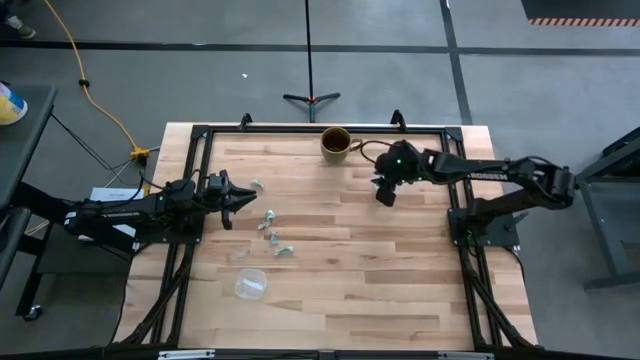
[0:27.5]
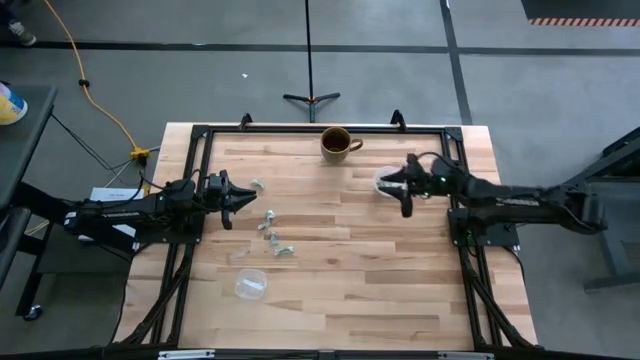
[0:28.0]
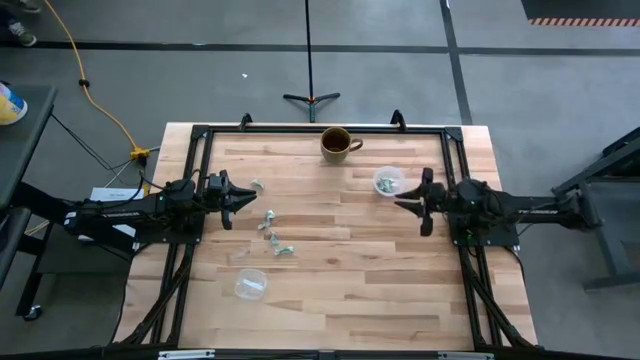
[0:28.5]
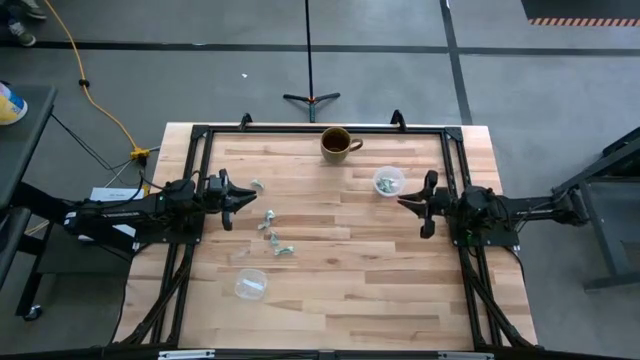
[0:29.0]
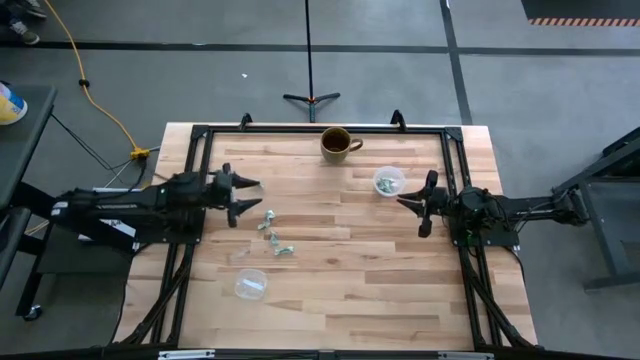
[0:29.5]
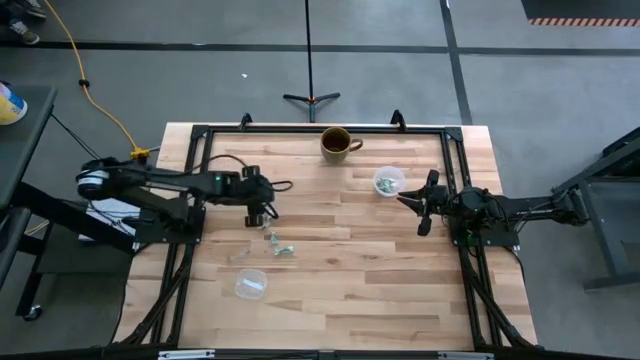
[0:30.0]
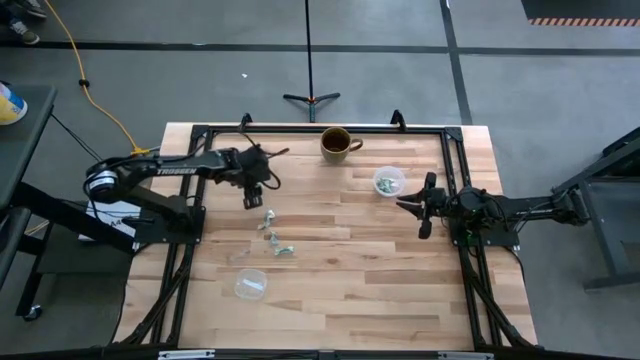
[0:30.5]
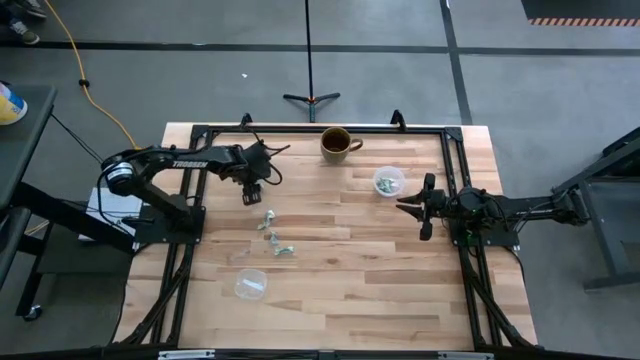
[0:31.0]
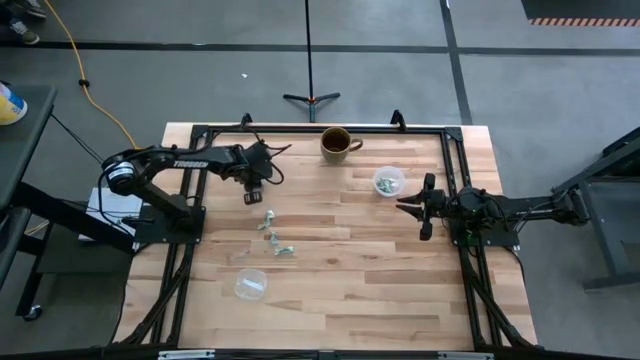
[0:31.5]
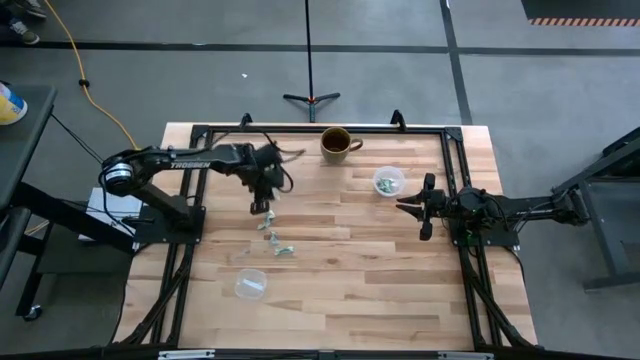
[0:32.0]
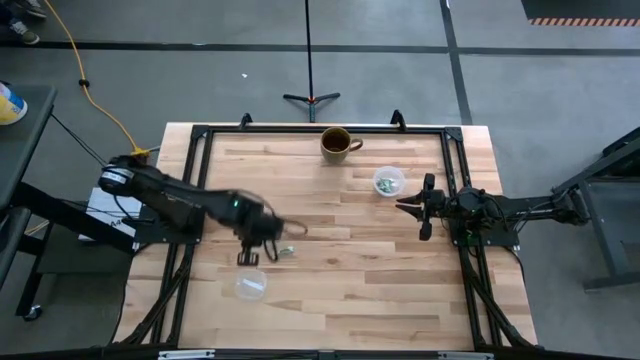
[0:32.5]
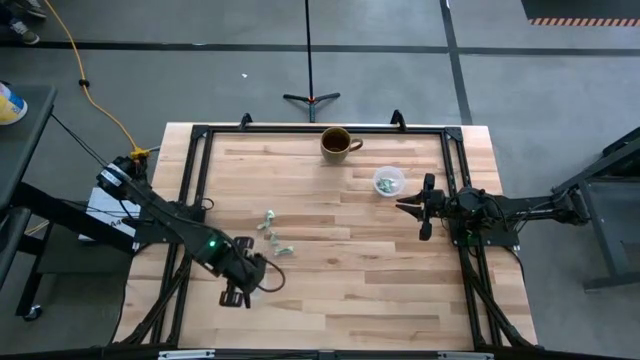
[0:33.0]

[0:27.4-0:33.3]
Task: Pick and place Stevia / Truvia into bins
Put the stevia packet into the bottom transparent container

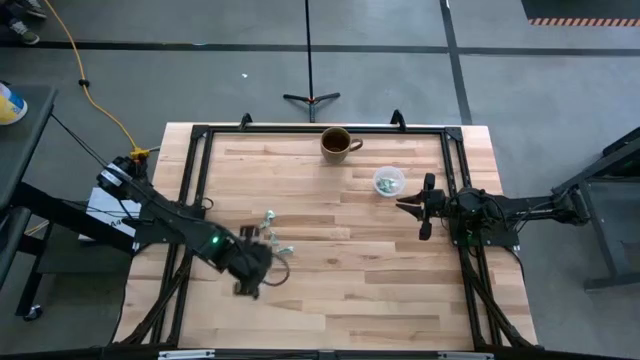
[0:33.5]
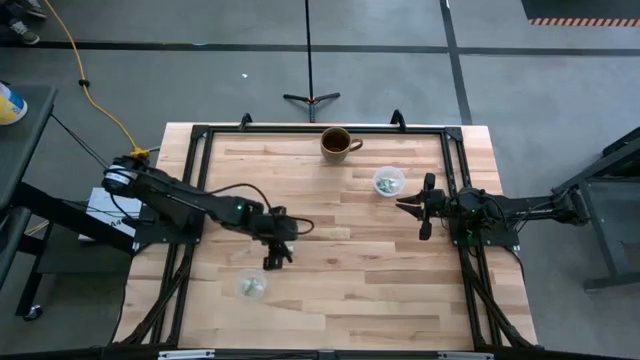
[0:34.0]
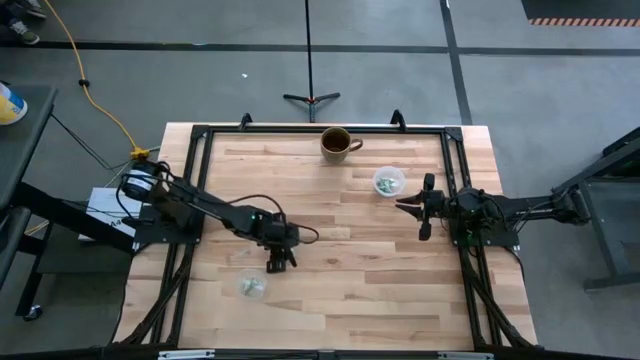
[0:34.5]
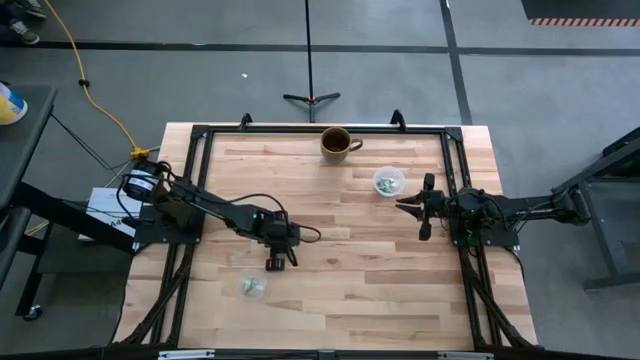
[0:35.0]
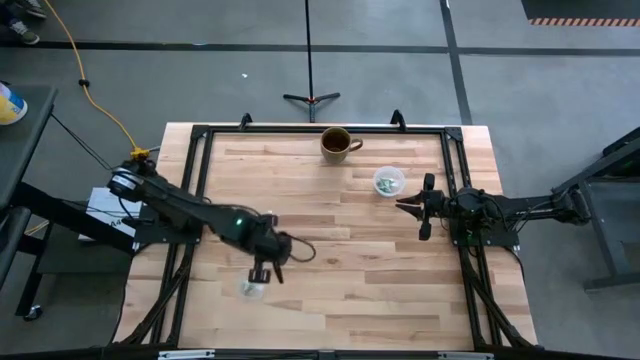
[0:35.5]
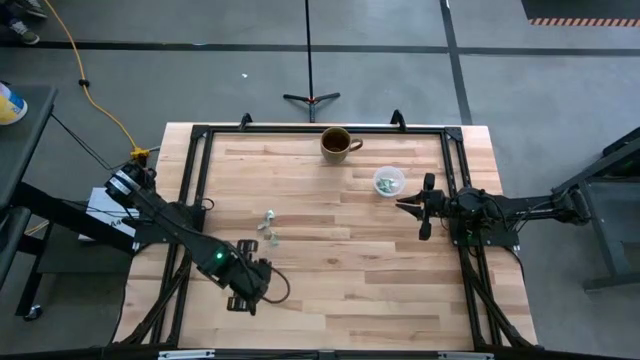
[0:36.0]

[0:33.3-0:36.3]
Put the stevia packet into the bottom transparent container

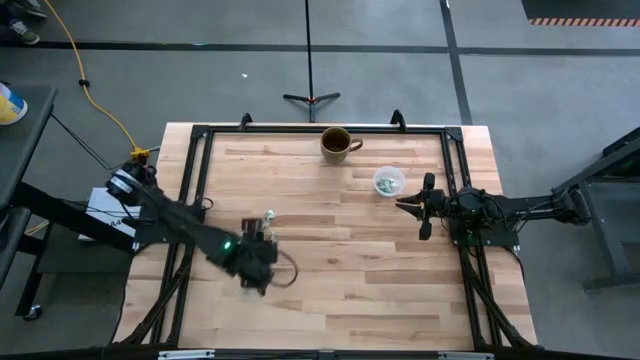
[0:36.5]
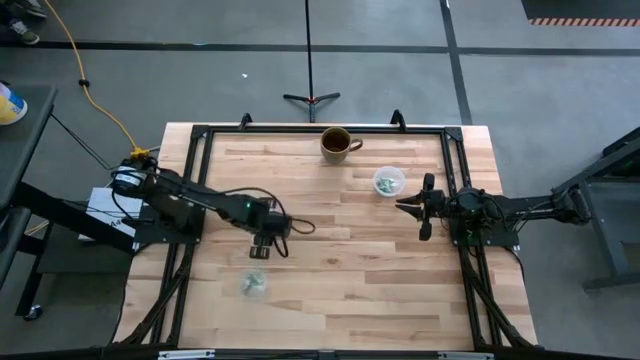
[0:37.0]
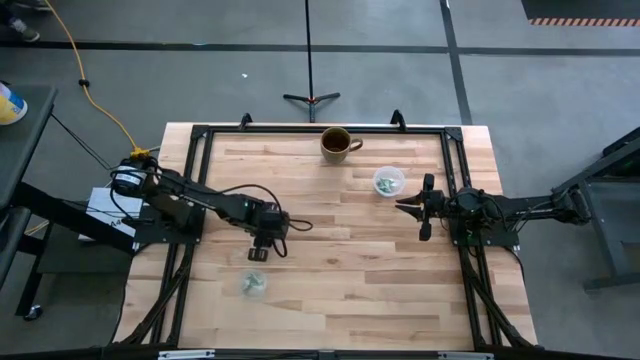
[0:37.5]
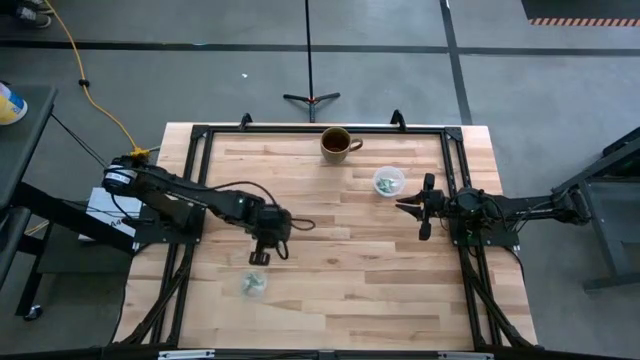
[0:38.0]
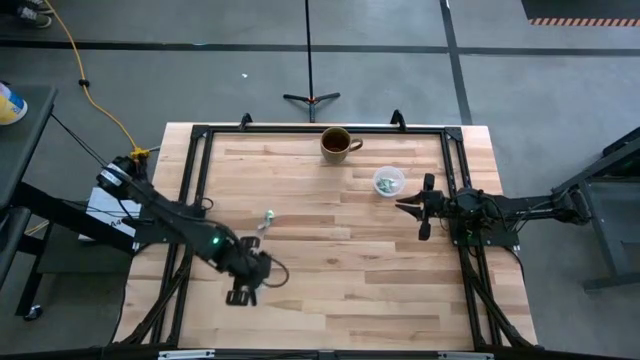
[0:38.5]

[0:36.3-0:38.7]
Put the stevia packet into the bottom transparent container

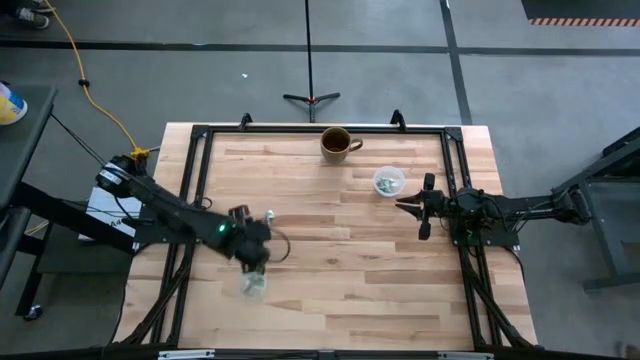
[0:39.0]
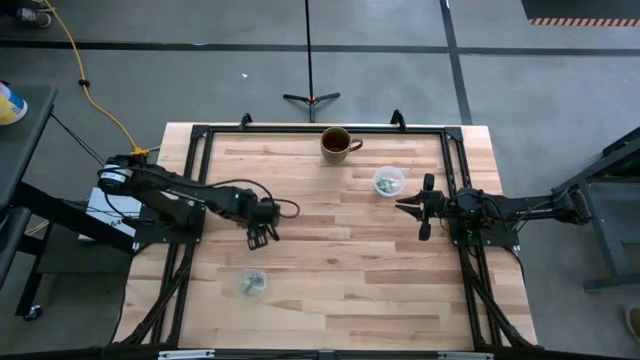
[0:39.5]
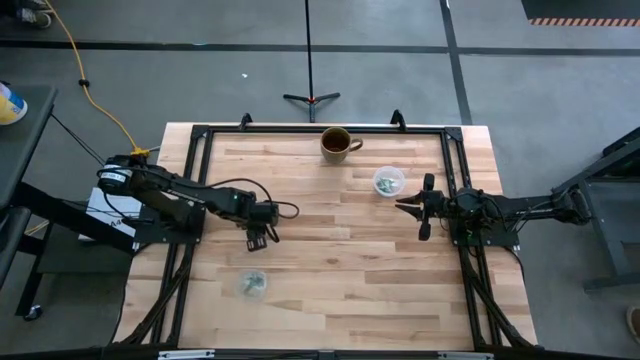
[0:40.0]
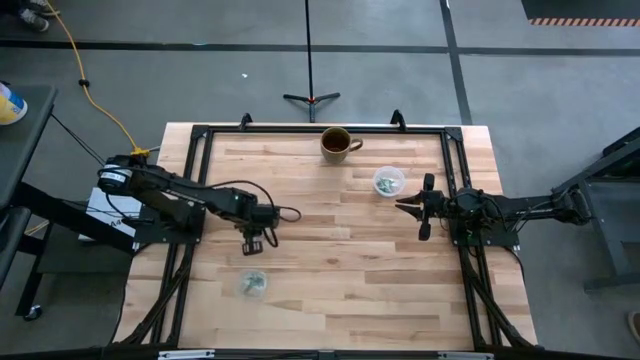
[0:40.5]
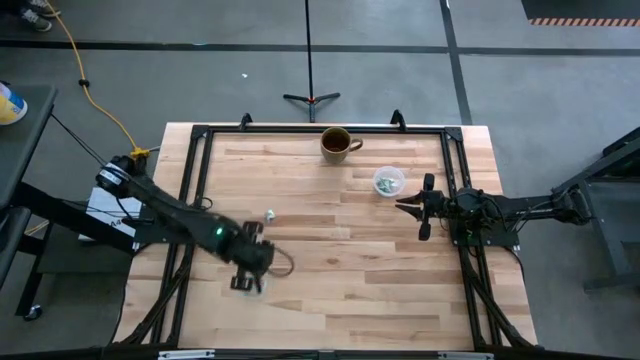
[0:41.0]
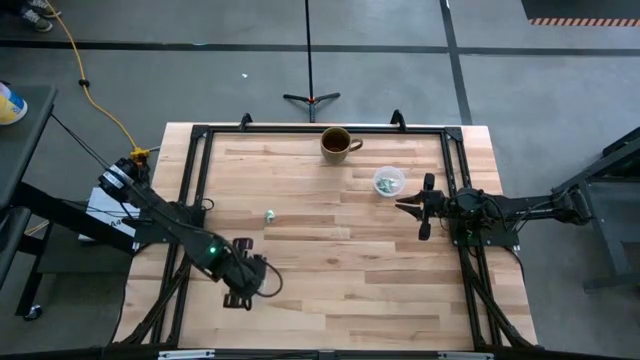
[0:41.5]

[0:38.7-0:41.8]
Put the stevia packet into the bottom transparent container

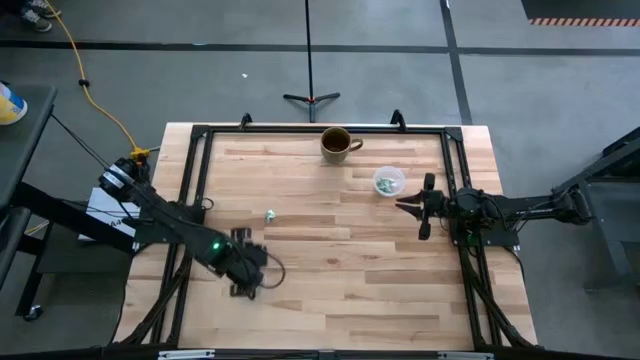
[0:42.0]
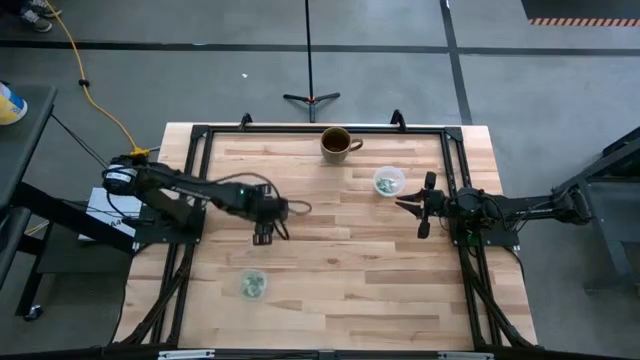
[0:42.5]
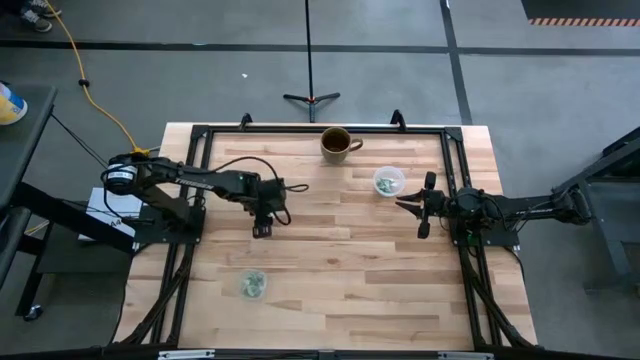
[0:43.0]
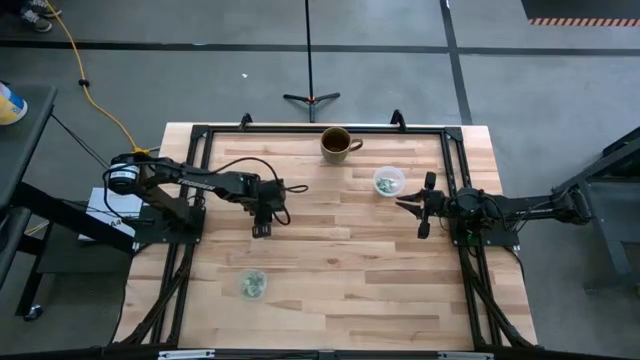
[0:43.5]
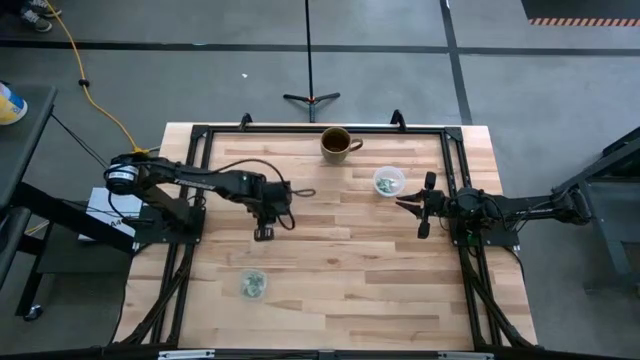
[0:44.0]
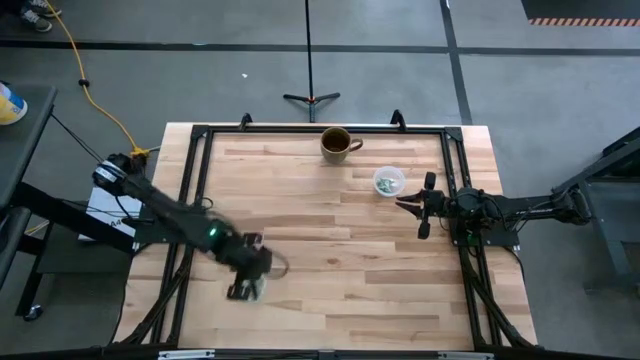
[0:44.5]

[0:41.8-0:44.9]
Put the stevia packet into the bottom transparent container

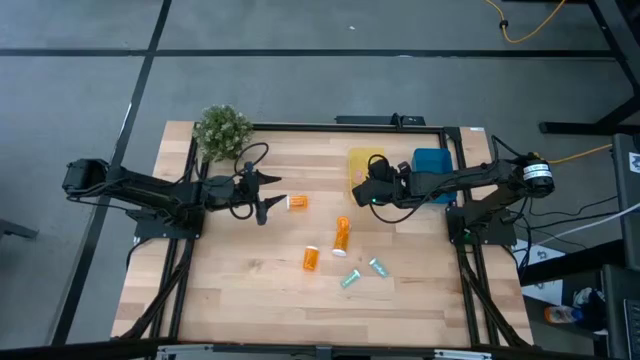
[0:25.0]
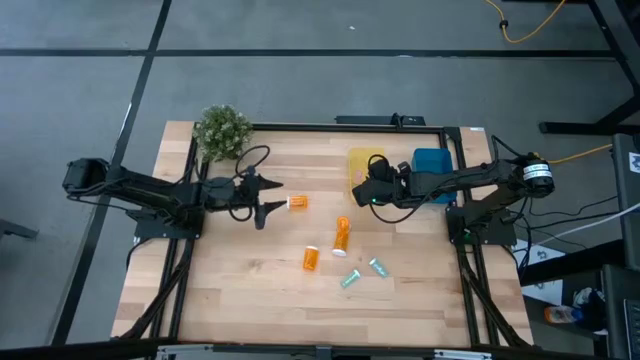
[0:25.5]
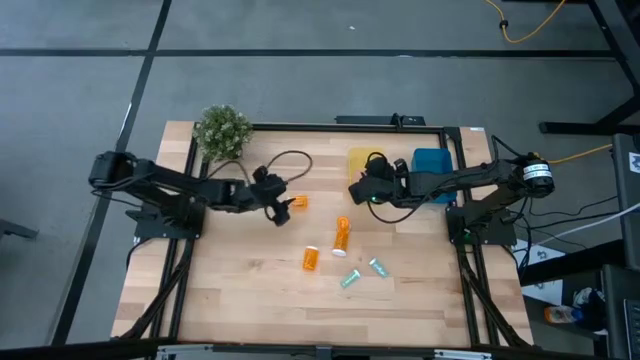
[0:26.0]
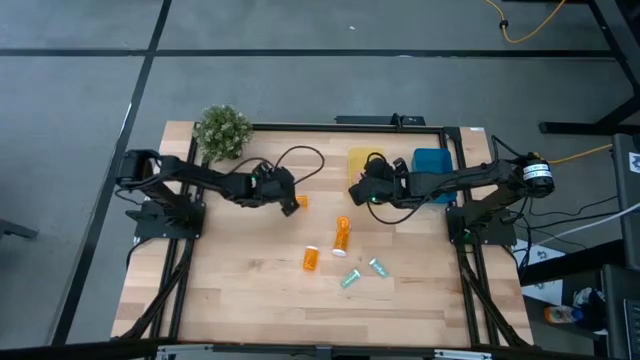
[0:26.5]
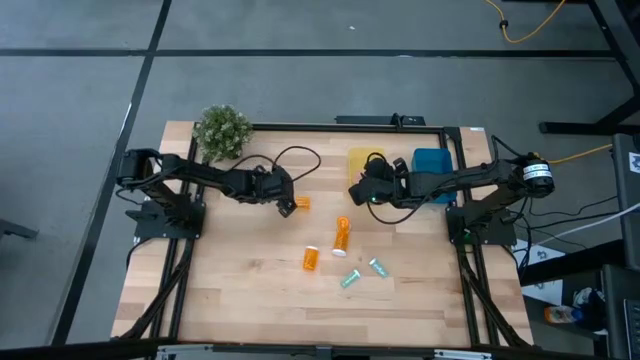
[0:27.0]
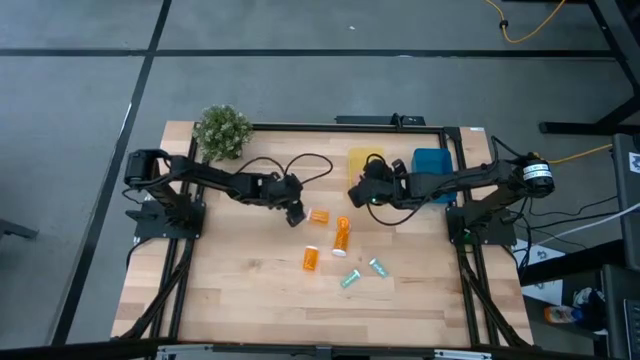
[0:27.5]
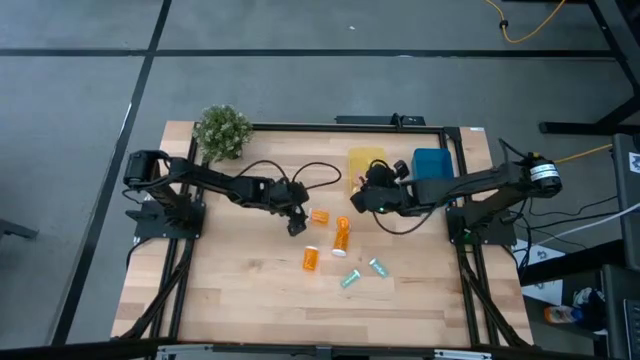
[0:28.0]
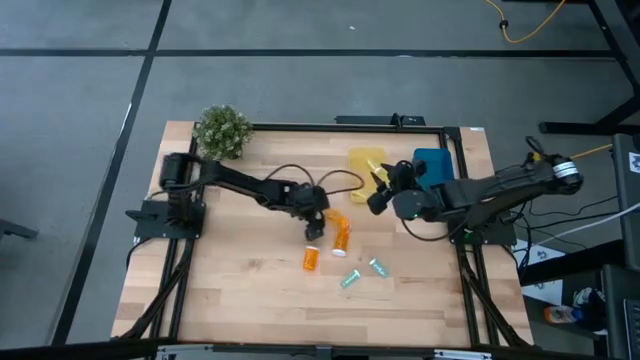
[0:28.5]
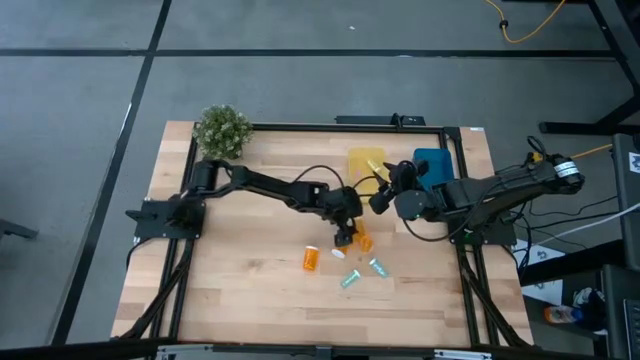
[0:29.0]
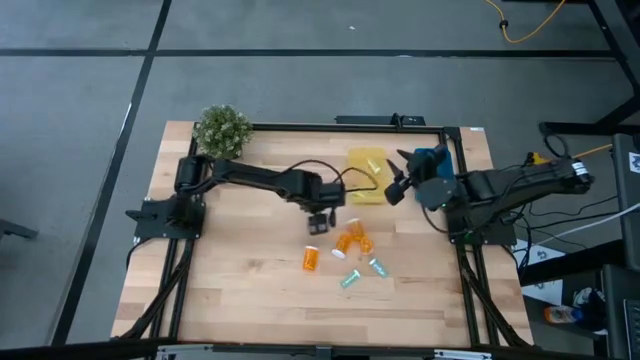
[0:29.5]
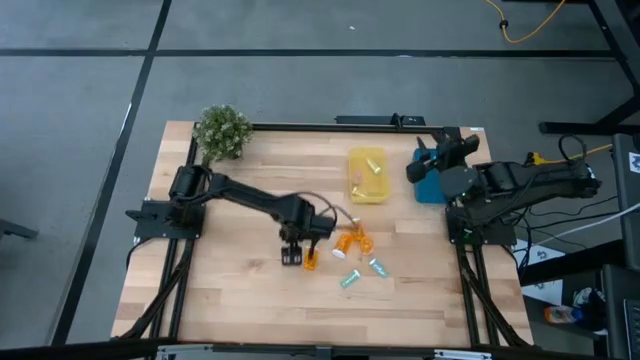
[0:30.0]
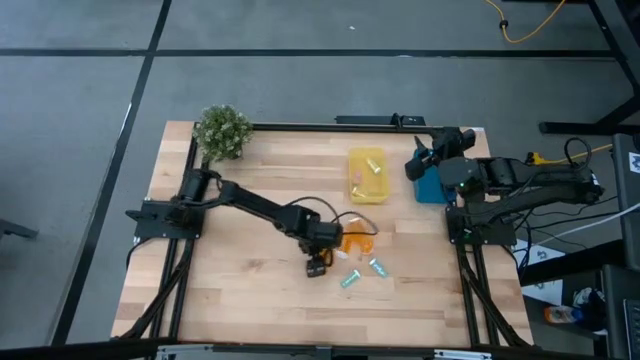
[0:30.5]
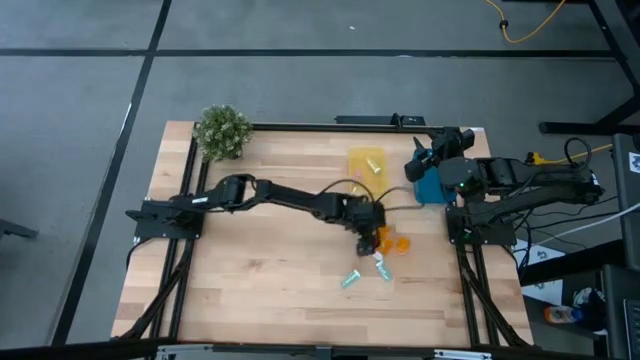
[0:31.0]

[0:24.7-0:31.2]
Task: Pick and place medicine bottles into bin by pill shape (circle, oval)
Move the large orange pill bottles to the middle right of the table
